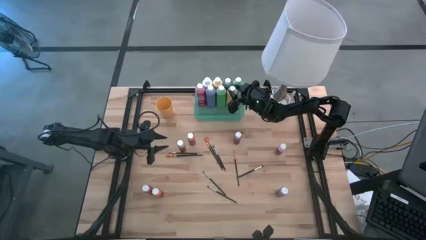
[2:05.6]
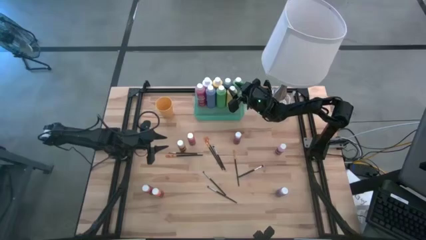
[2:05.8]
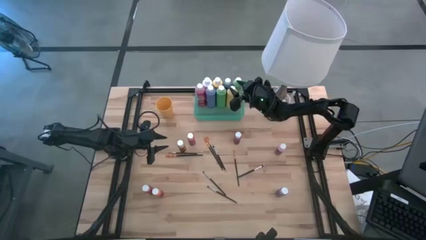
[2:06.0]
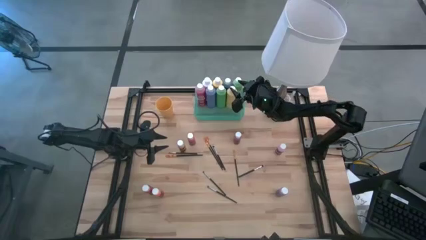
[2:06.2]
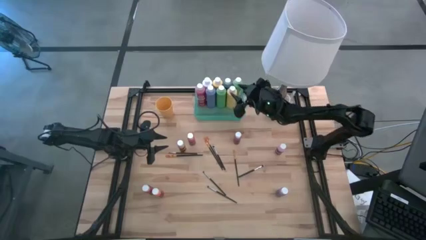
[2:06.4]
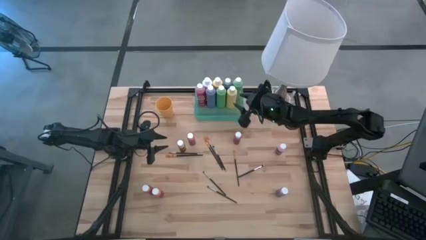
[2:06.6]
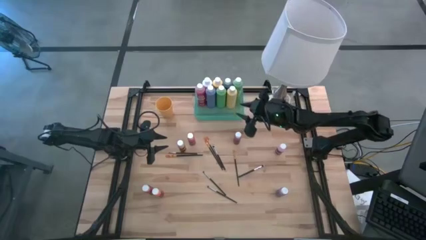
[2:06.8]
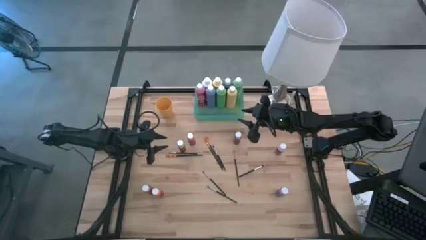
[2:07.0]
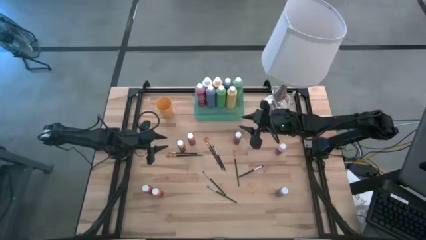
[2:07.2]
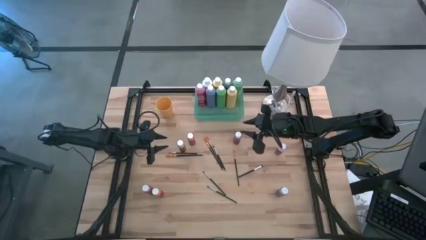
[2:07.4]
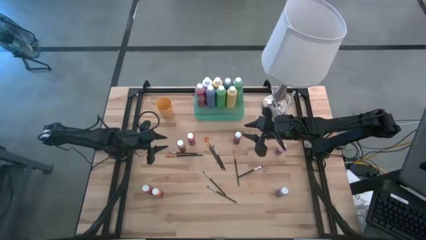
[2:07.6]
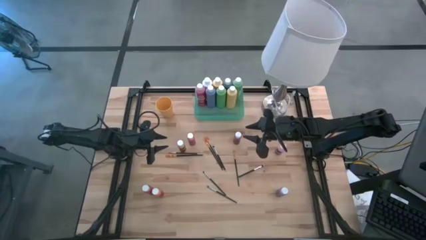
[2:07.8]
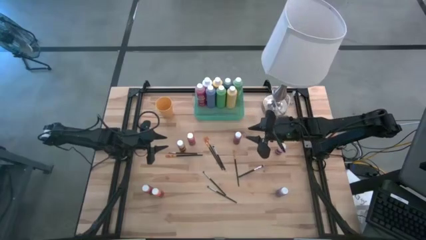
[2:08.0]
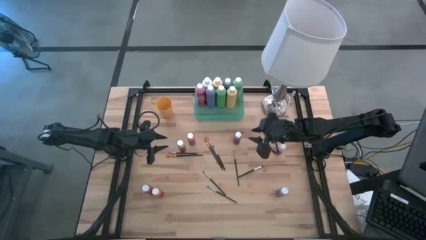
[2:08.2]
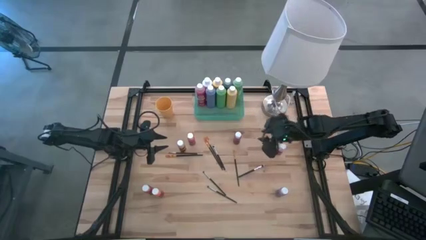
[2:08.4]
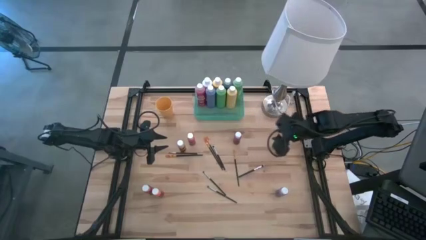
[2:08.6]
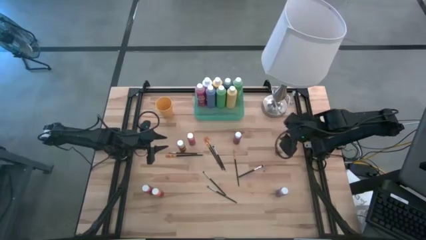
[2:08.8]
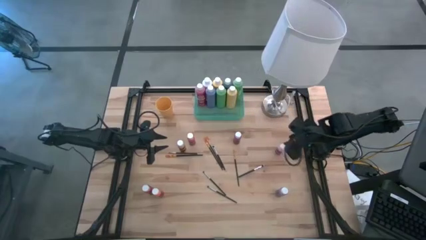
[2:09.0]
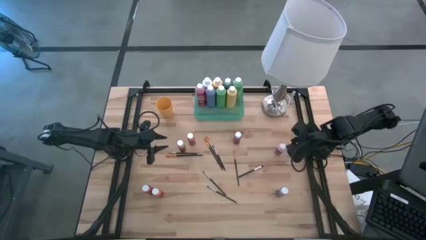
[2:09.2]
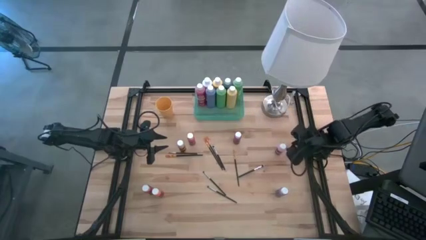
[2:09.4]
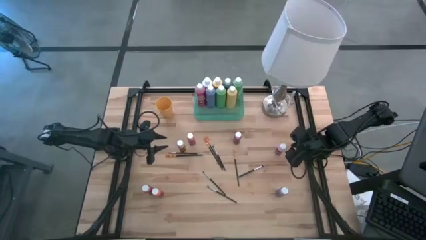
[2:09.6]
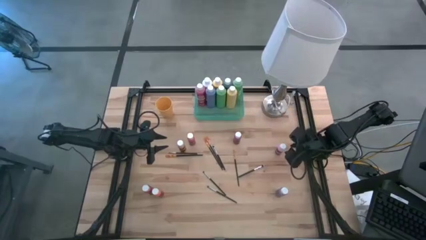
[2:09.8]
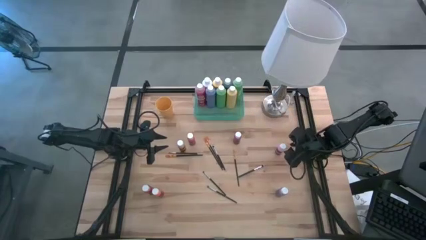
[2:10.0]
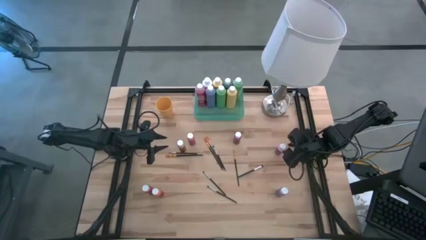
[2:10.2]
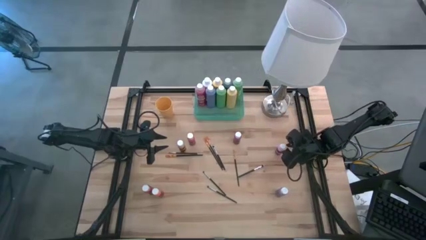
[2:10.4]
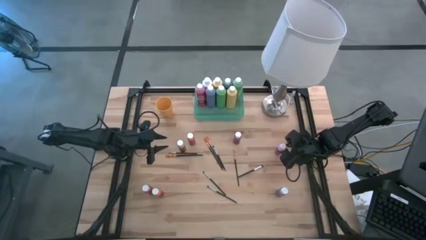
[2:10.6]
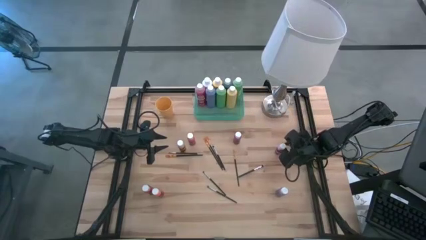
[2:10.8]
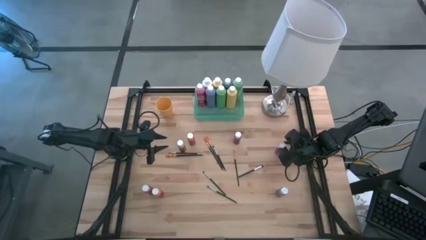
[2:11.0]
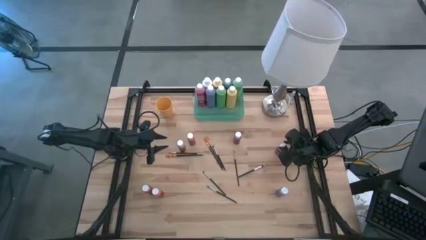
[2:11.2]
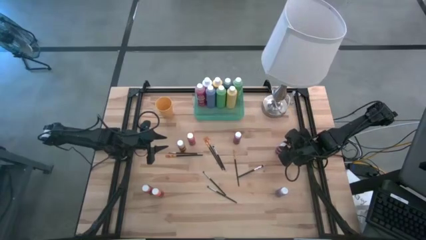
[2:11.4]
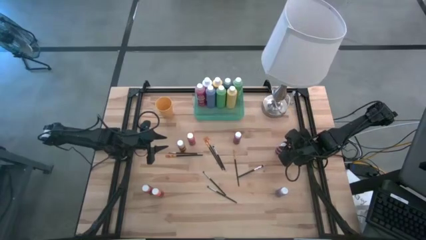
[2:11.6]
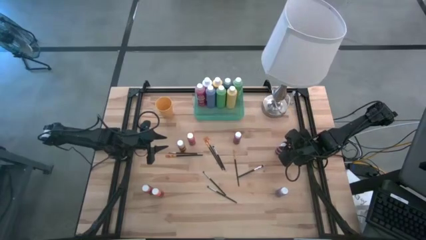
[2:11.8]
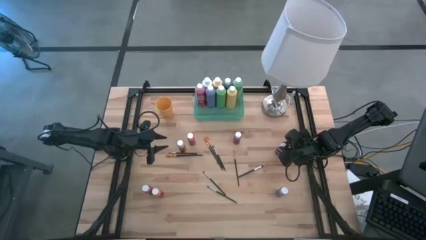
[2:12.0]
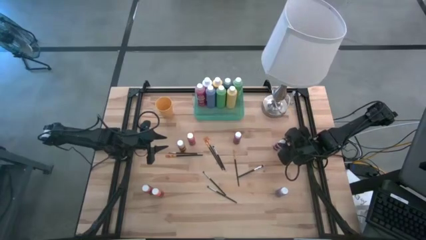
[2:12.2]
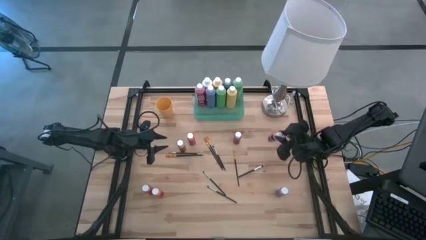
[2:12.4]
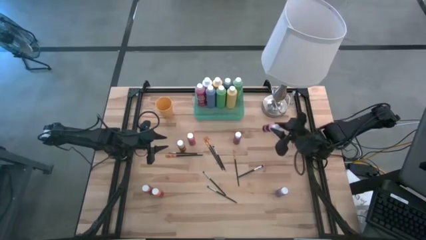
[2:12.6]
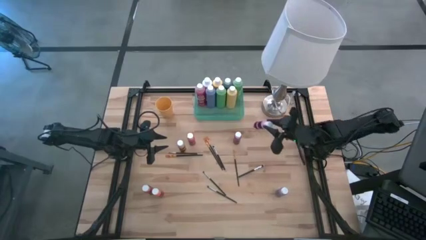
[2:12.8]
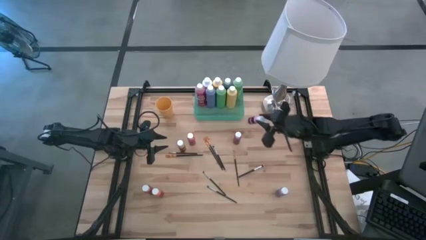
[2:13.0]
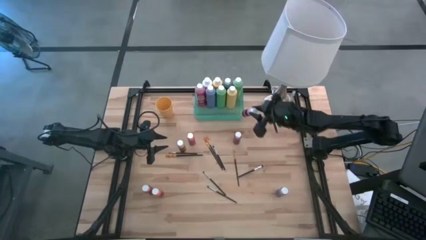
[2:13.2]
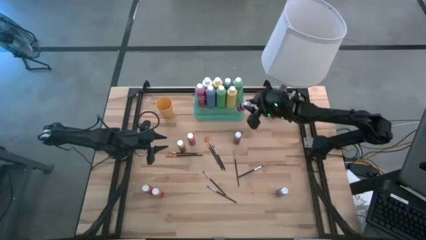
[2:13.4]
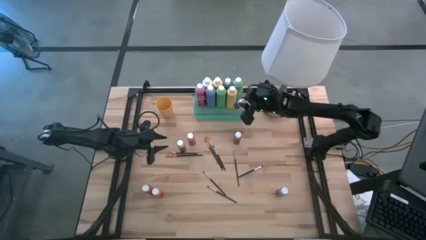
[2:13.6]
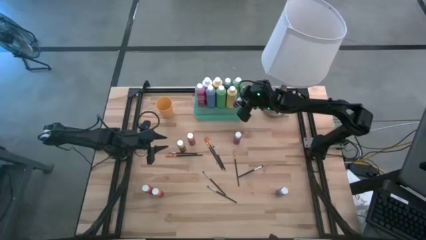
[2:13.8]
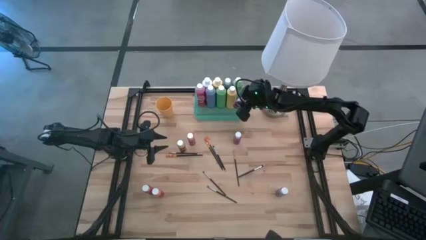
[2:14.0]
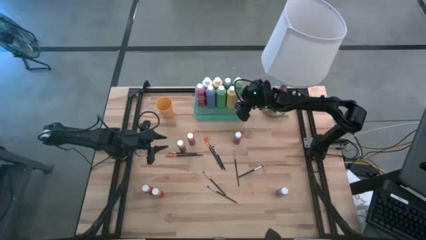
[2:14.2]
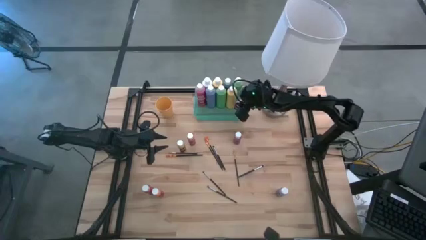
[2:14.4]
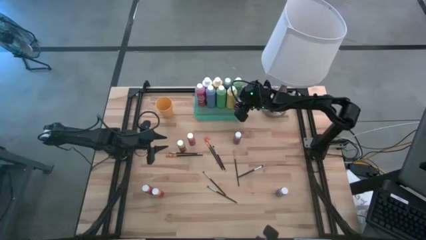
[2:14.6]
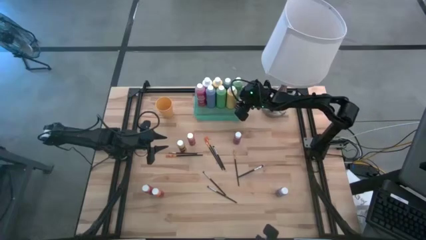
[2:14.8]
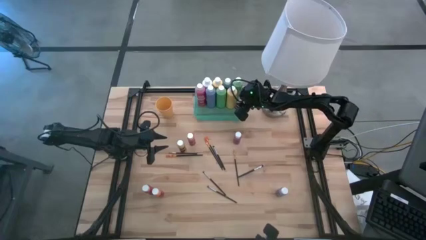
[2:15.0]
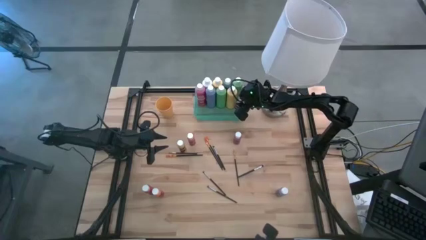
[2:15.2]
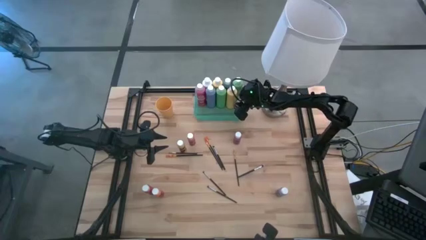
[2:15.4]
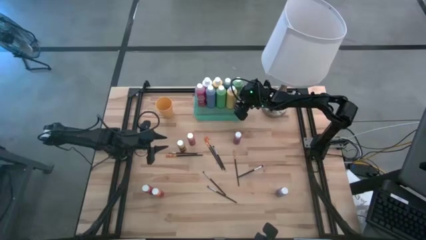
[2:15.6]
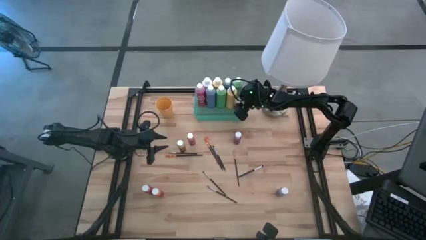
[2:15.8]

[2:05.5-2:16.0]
Task: Pick & Place Paint Supplies
Put the small light pink paint bottle into the green bin

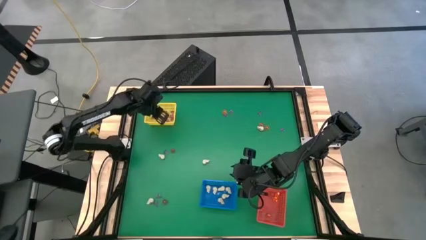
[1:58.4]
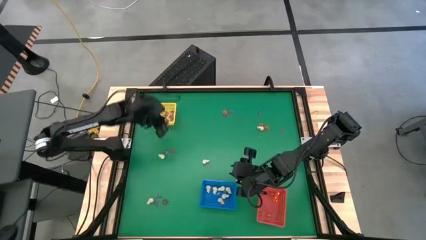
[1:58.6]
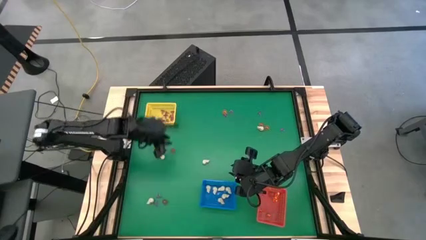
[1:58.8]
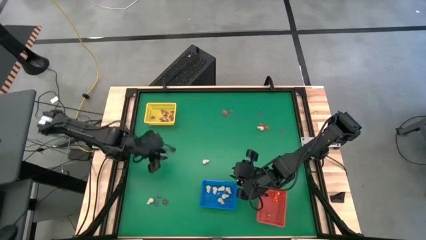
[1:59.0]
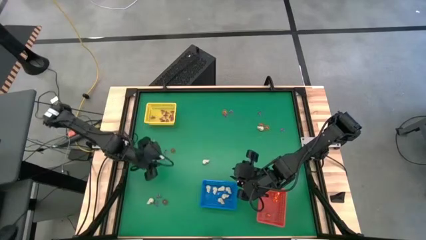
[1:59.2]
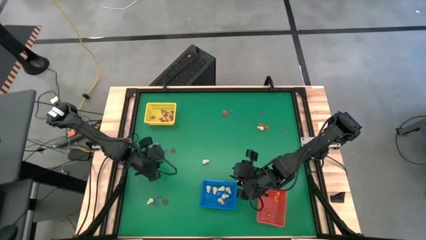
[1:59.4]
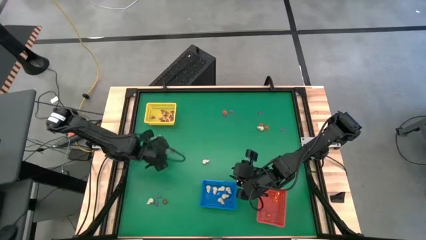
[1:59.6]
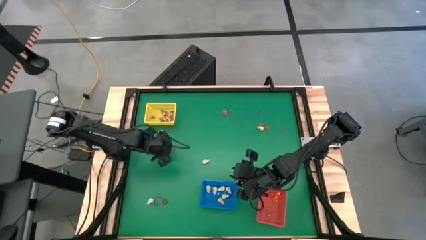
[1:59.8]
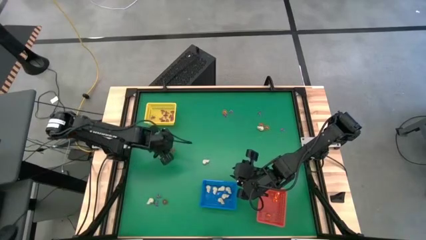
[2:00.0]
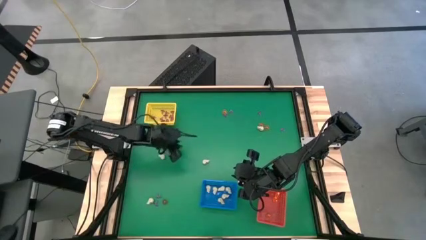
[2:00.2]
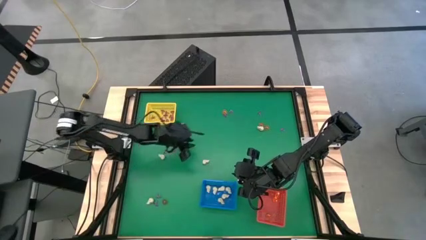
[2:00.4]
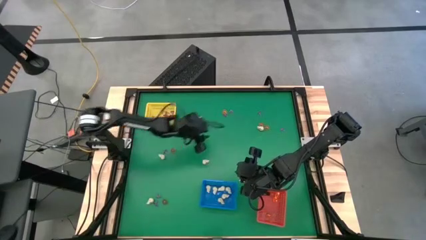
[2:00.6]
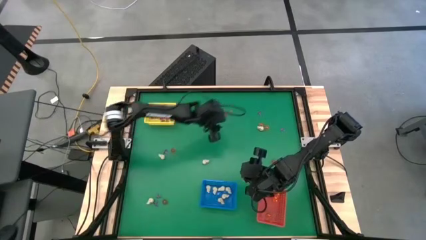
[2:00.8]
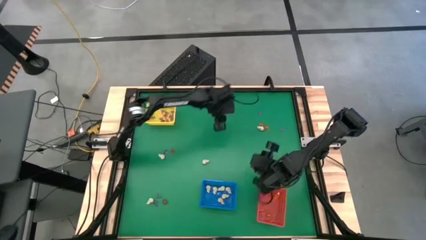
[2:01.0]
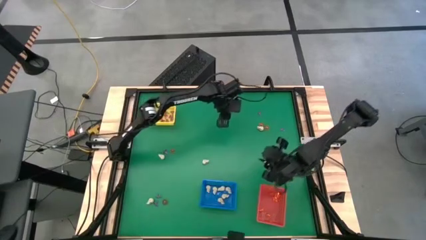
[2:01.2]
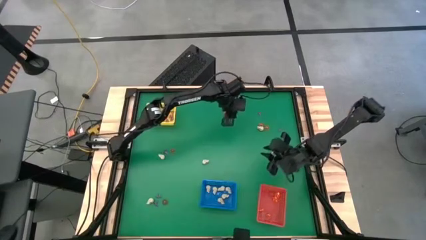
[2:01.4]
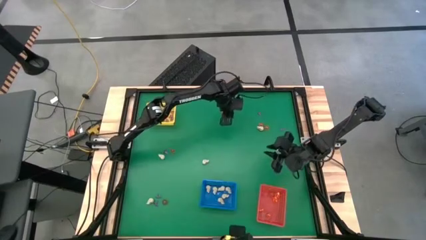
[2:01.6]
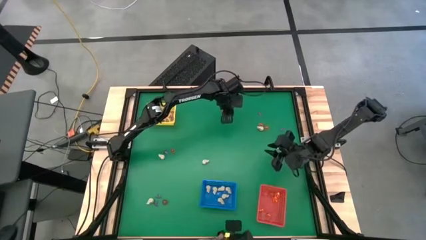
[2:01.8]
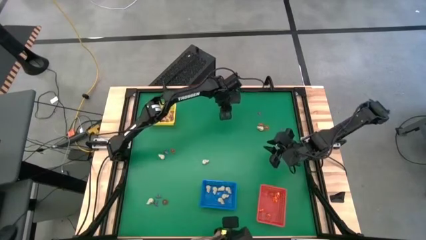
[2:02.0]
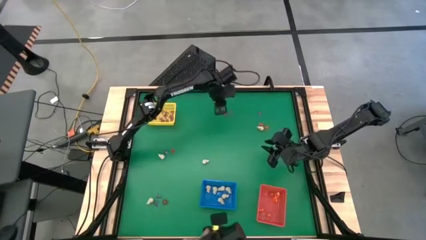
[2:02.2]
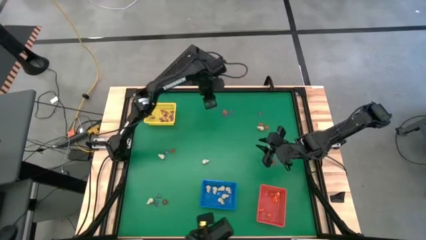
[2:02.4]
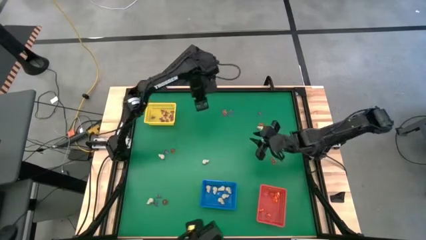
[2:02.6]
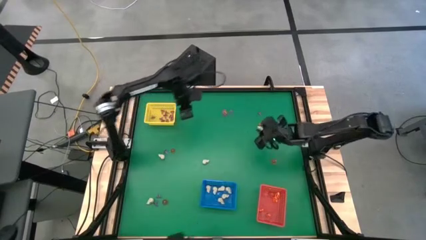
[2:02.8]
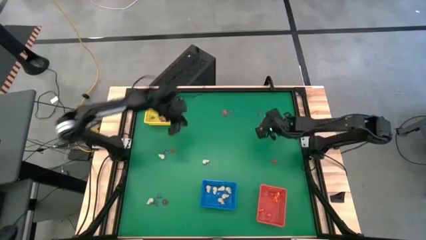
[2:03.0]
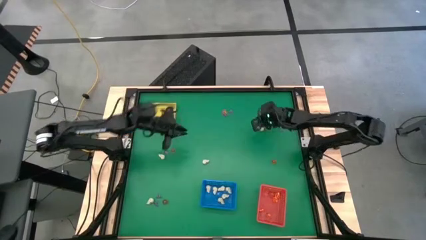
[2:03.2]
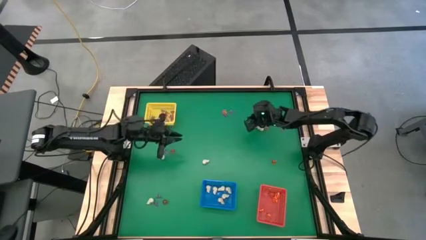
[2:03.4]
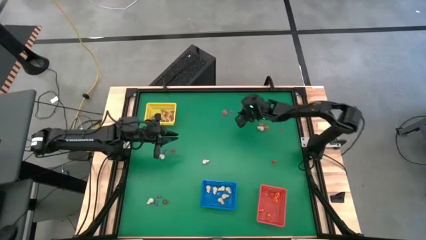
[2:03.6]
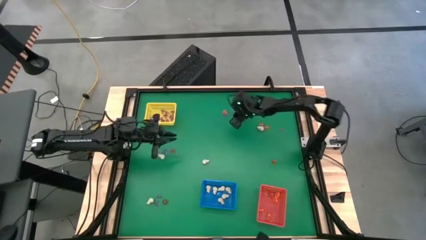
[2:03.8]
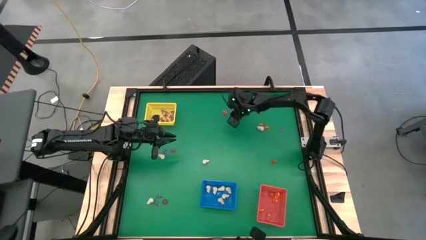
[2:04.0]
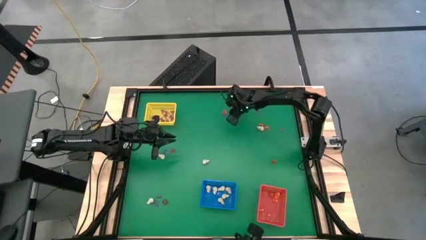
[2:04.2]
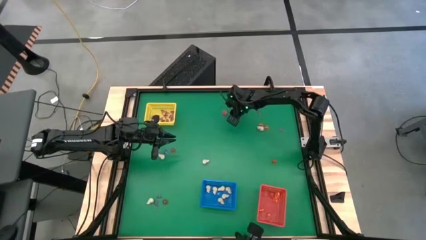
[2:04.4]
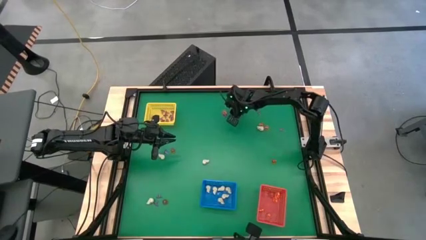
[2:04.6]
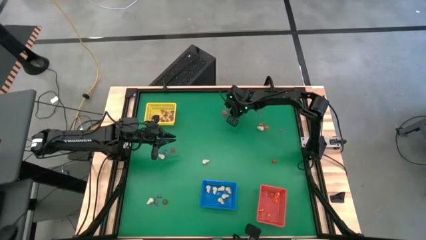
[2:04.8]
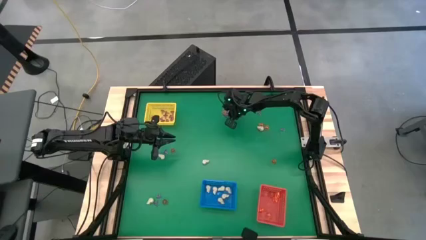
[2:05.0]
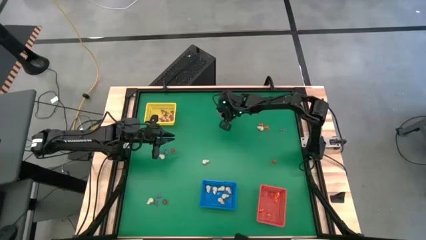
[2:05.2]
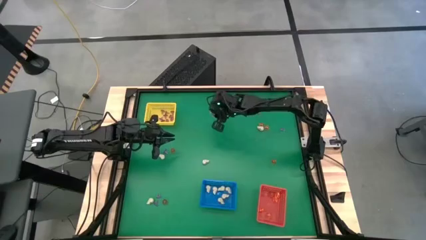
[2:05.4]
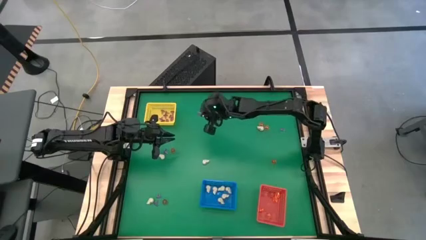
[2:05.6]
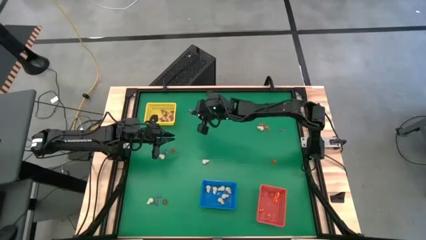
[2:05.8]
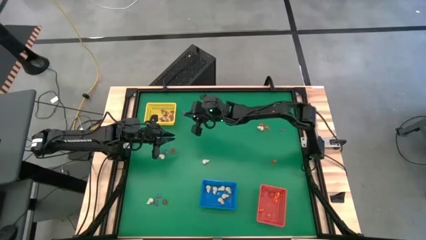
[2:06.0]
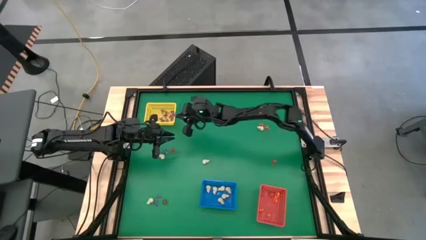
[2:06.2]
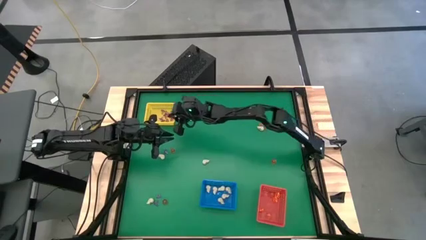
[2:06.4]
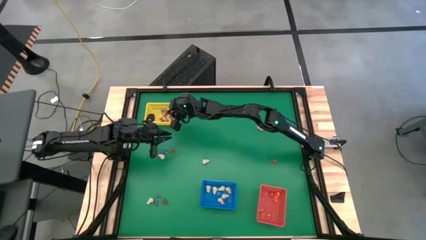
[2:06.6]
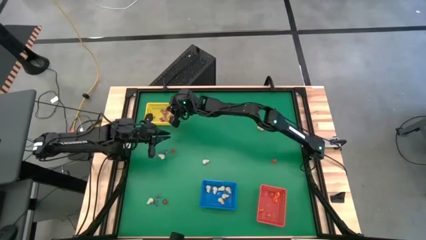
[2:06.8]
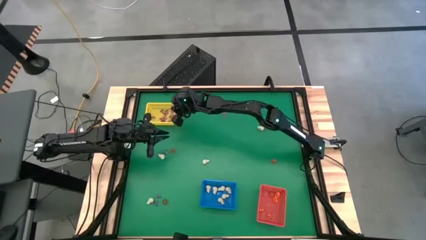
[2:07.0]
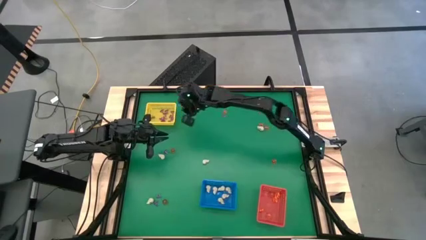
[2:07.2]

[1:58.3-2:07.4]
Task: Sort Halloween decoration
Put the purple witch hat toy into the yellow basket
